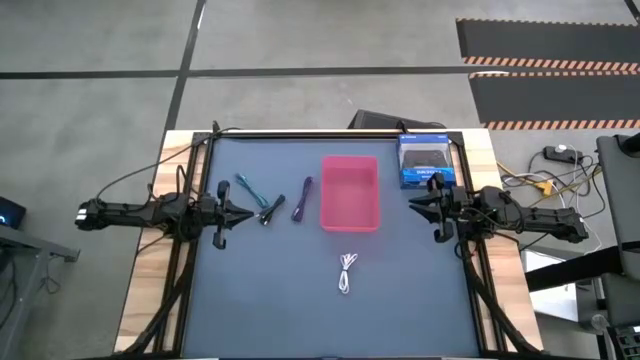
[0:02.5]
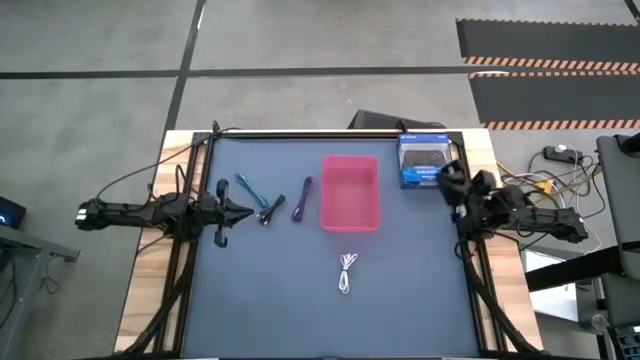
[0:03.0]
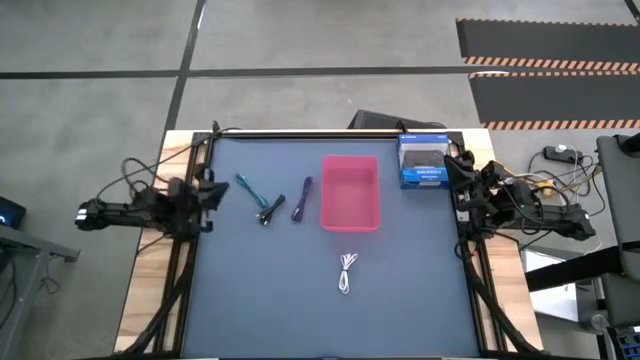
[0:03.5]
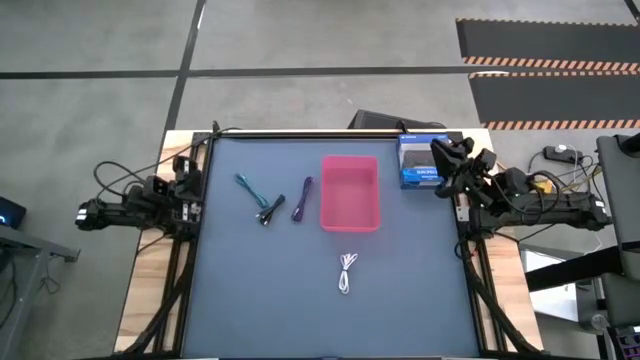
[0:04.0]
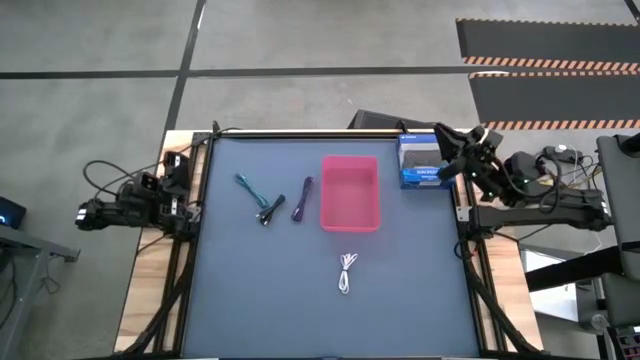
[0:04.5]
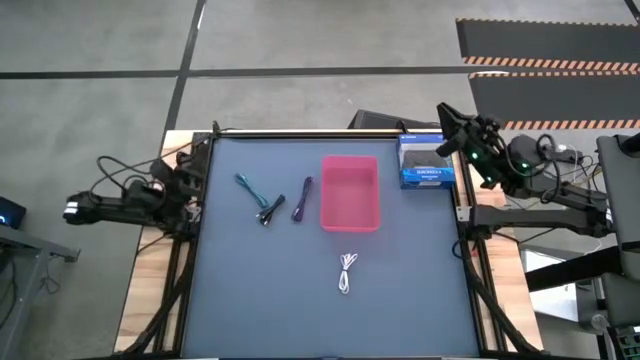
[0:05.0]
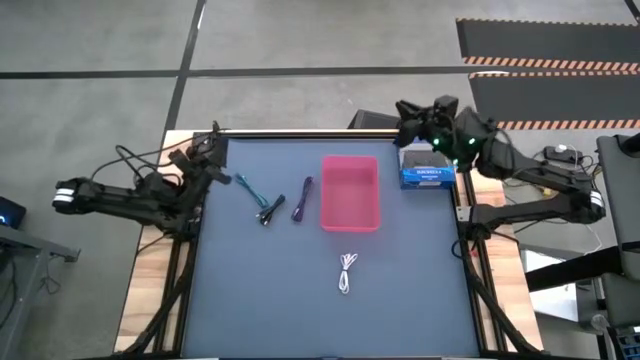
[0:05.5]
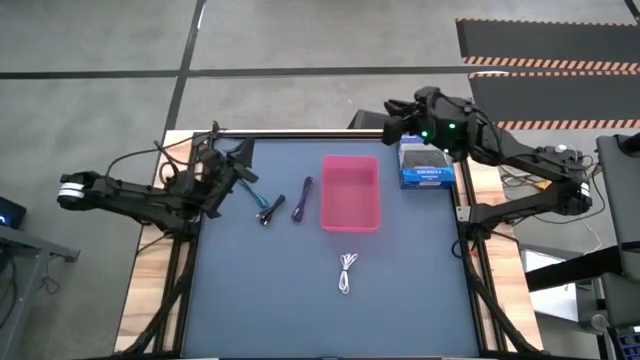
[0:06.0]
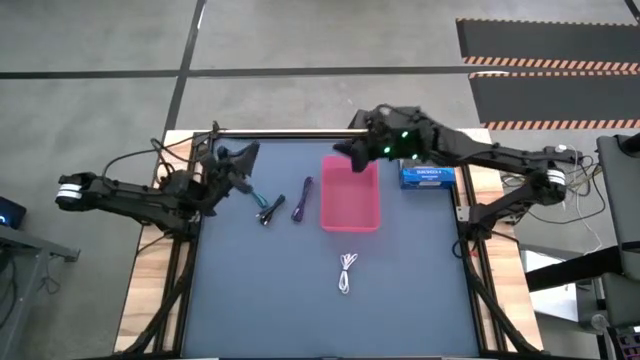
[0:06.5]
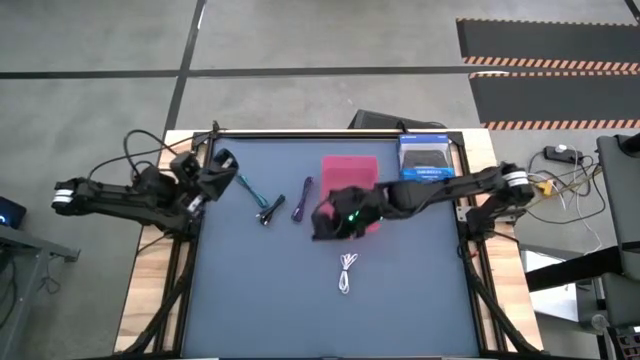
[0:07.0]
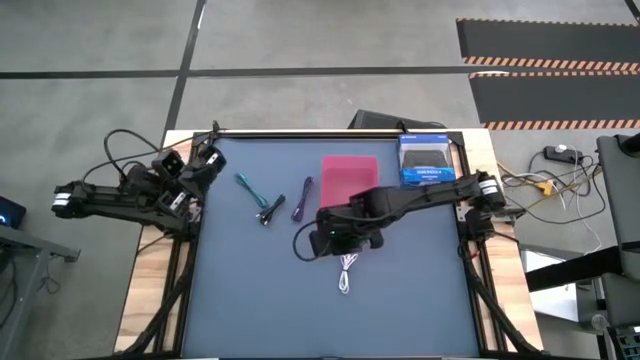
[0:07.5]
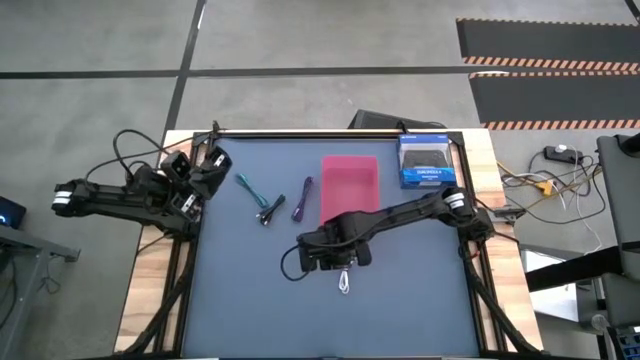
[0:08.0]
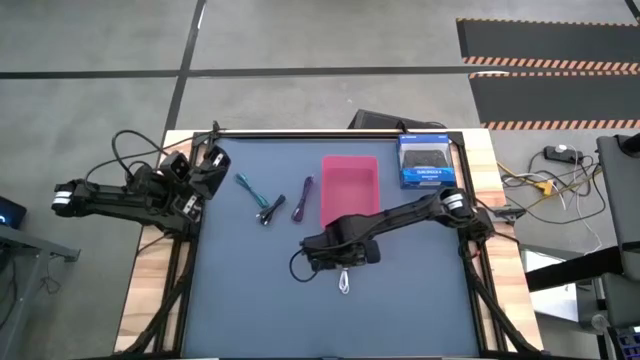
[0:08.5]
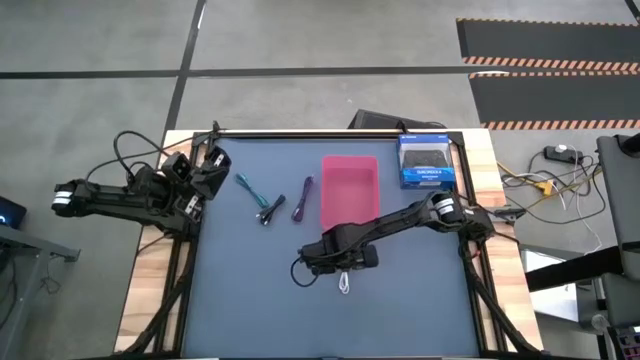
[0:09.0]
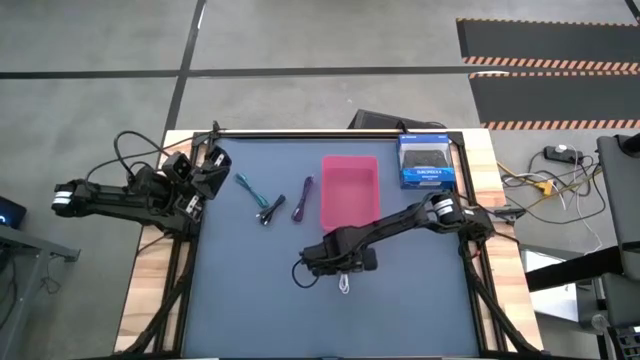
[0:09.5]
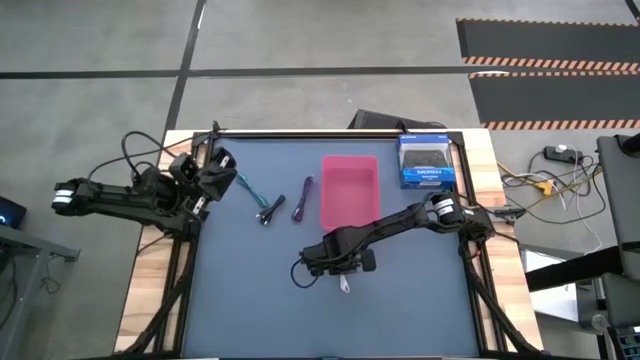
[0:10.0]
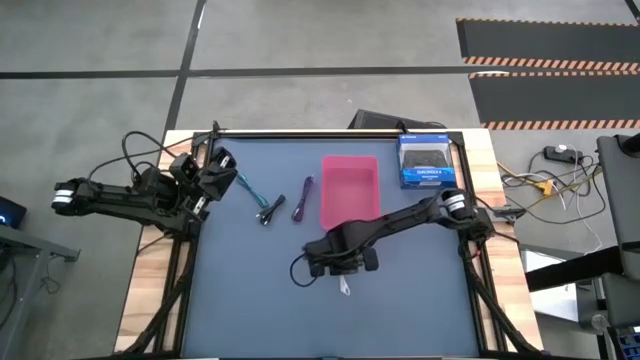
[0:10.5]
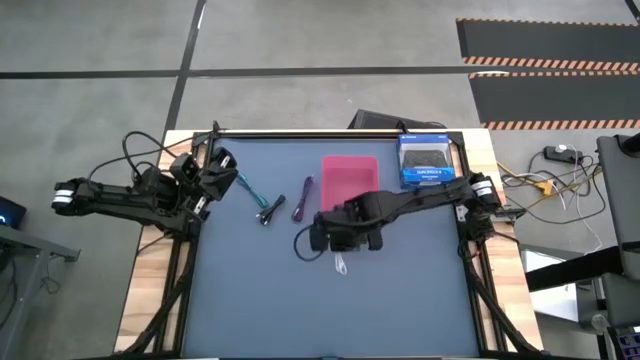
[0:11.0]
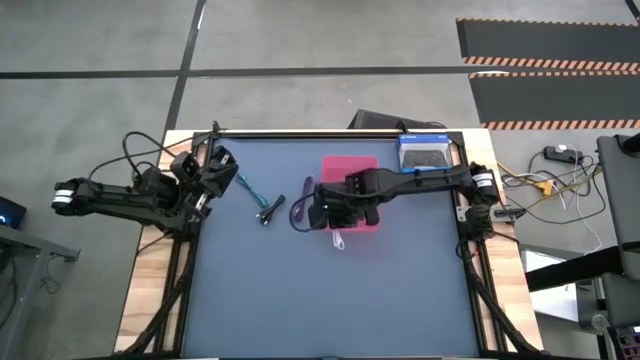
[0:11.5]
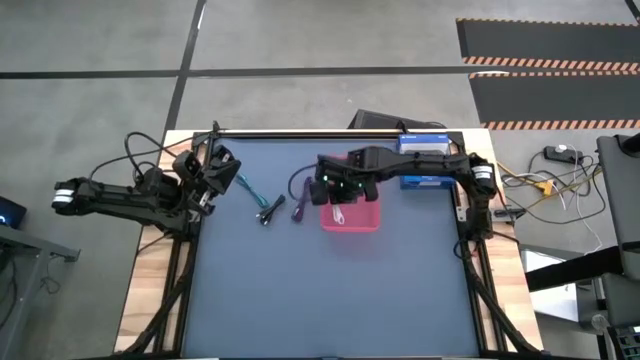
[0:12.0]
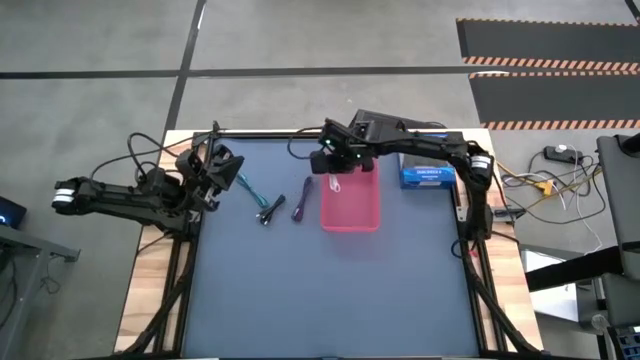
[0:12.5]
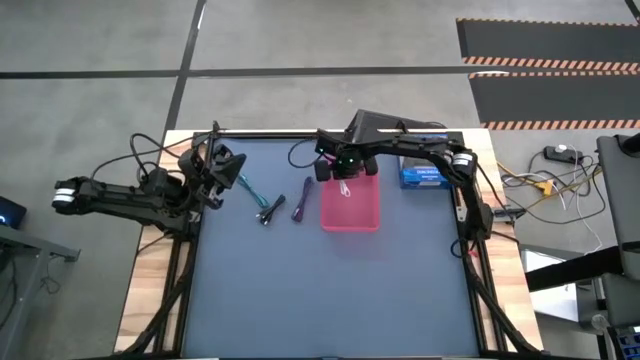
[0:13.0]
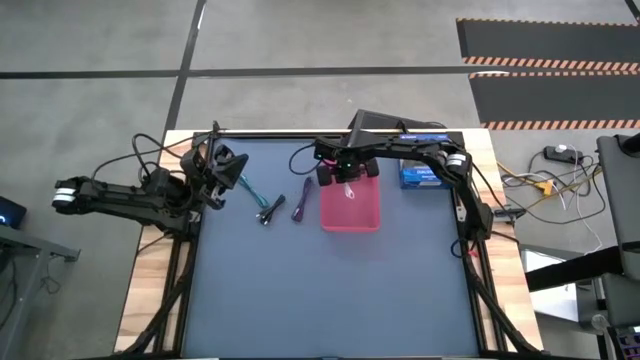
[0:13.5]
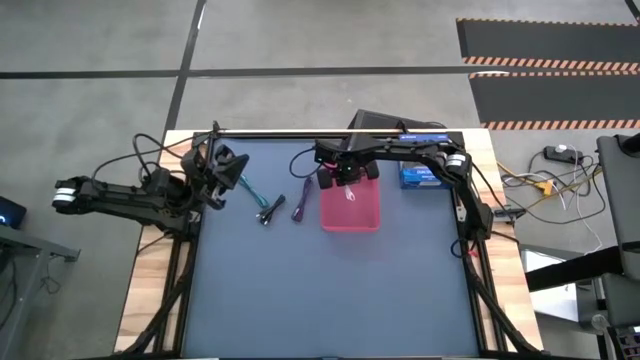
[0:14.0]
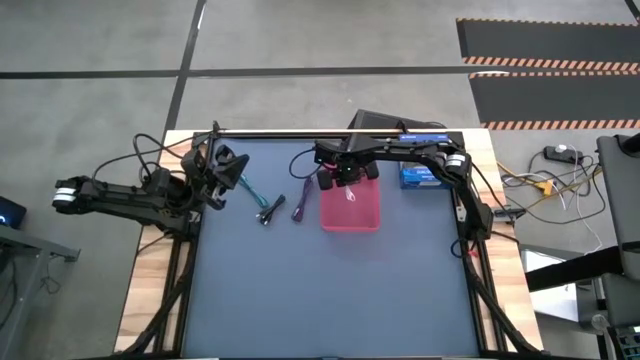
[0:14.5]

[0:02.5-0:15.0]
Task: Pick and place USB-C Cables
Put the white USB cable into the red bin

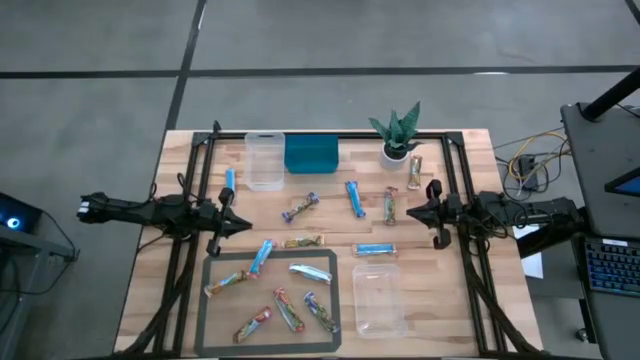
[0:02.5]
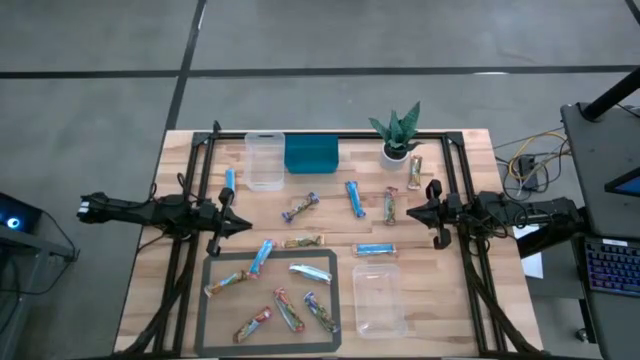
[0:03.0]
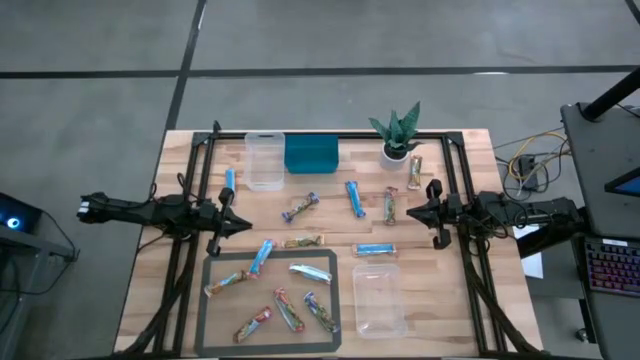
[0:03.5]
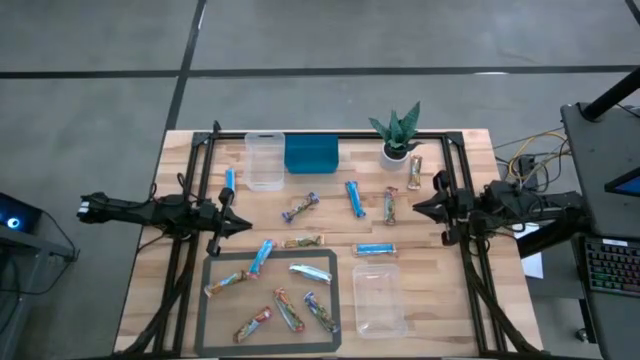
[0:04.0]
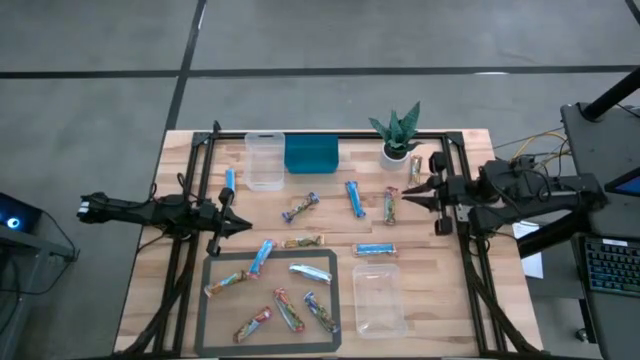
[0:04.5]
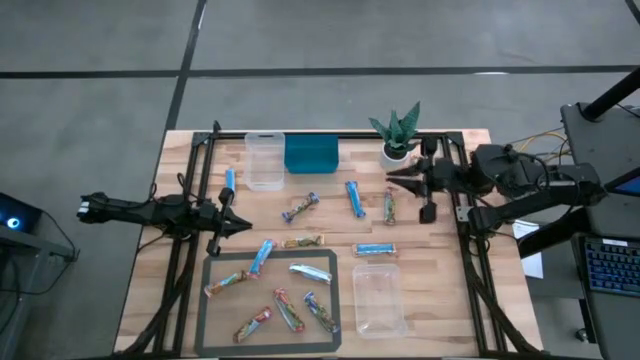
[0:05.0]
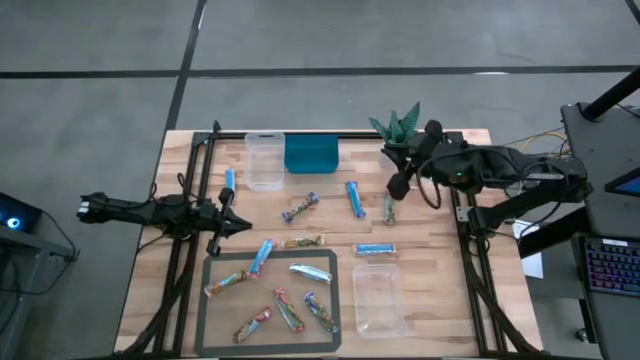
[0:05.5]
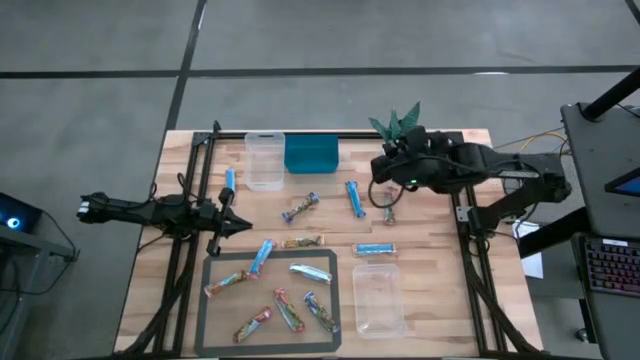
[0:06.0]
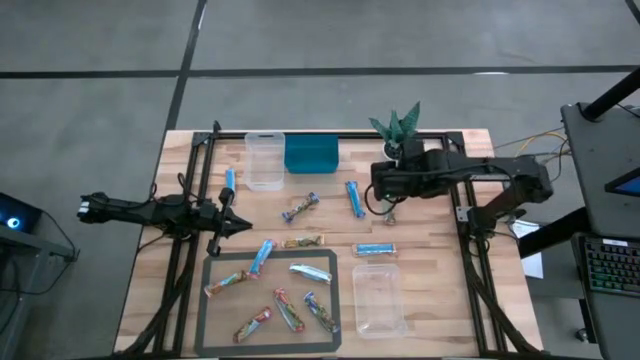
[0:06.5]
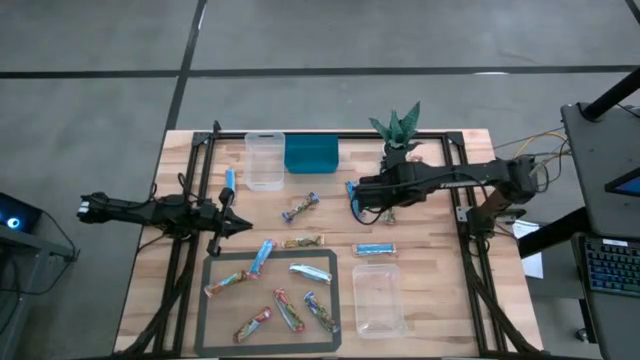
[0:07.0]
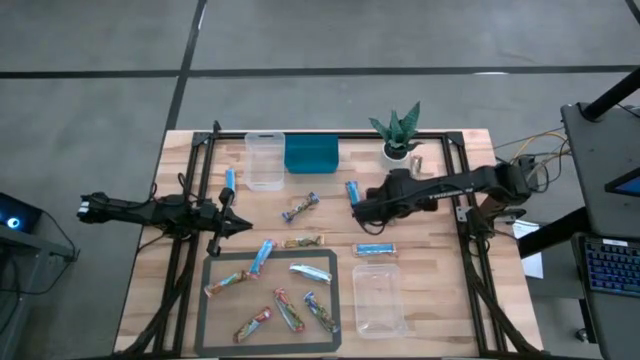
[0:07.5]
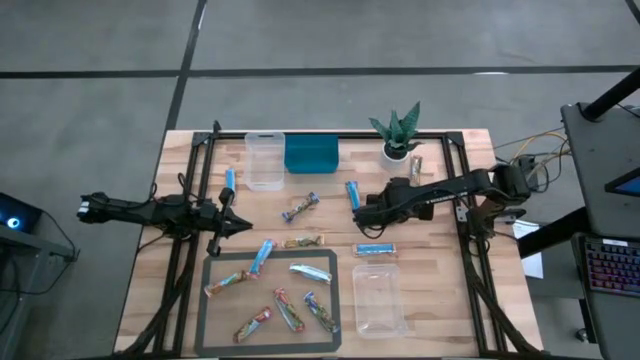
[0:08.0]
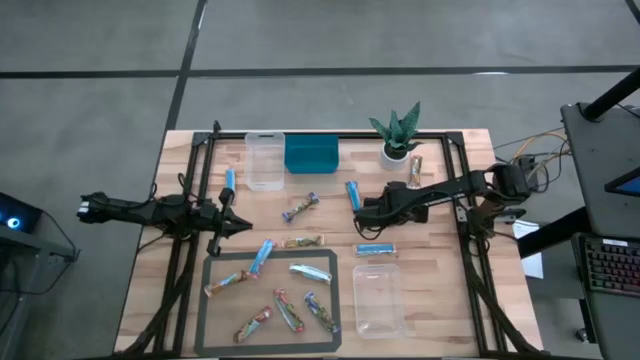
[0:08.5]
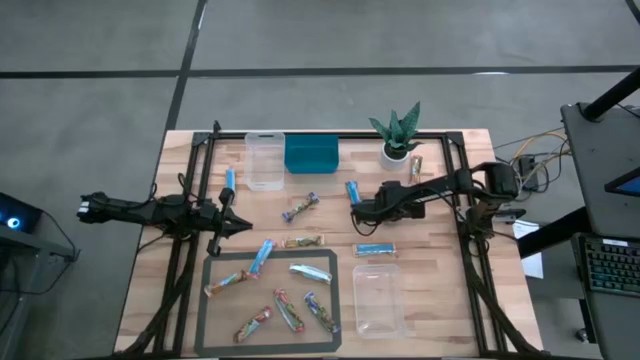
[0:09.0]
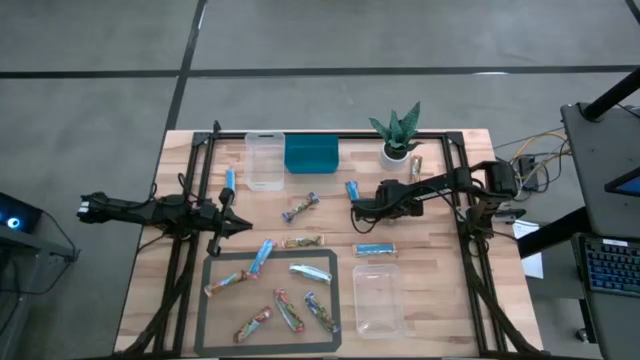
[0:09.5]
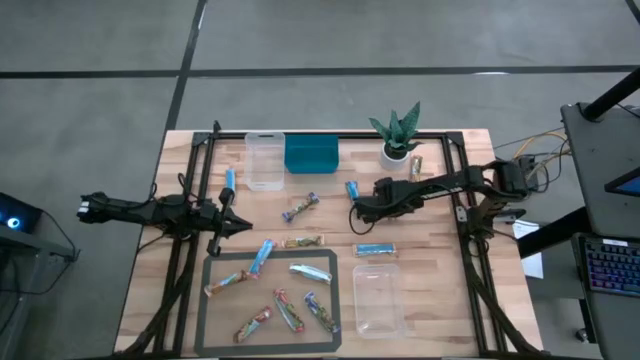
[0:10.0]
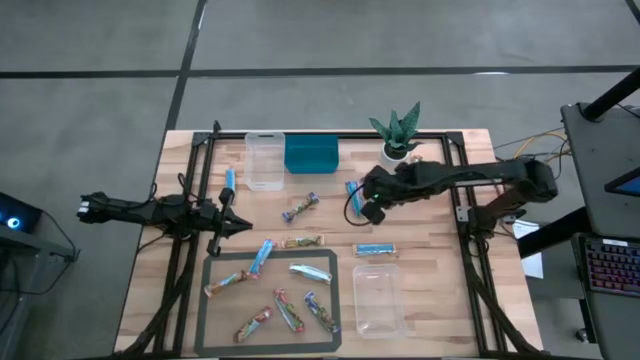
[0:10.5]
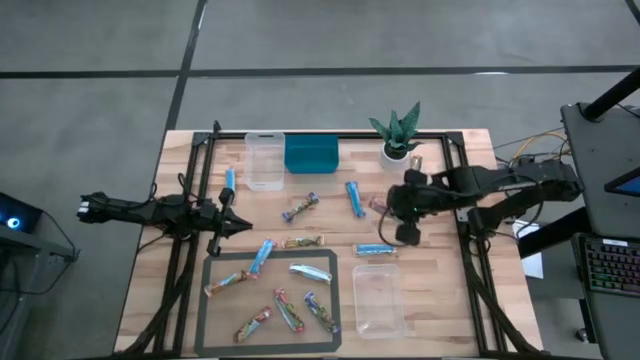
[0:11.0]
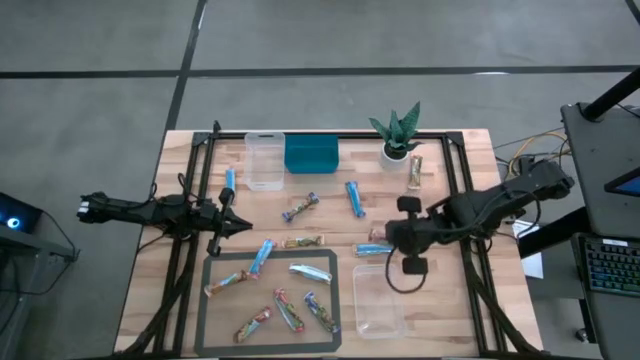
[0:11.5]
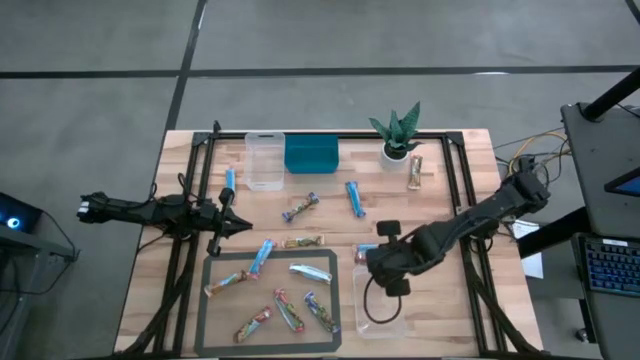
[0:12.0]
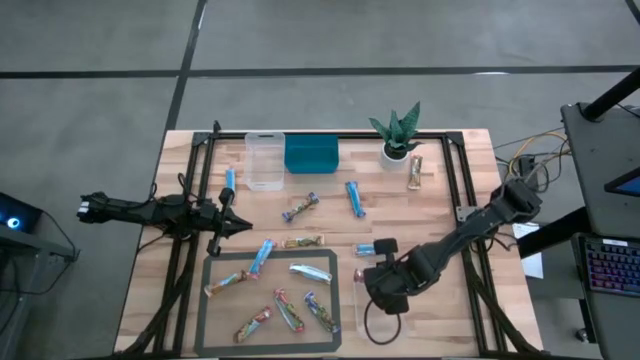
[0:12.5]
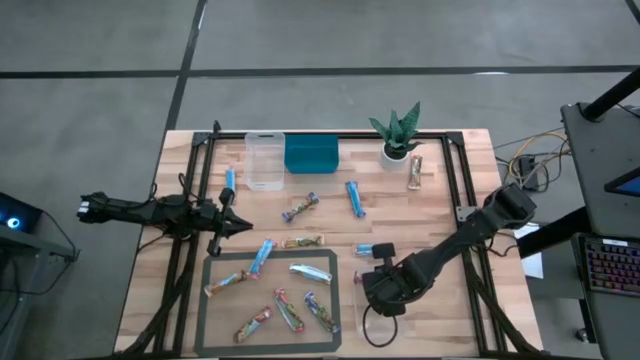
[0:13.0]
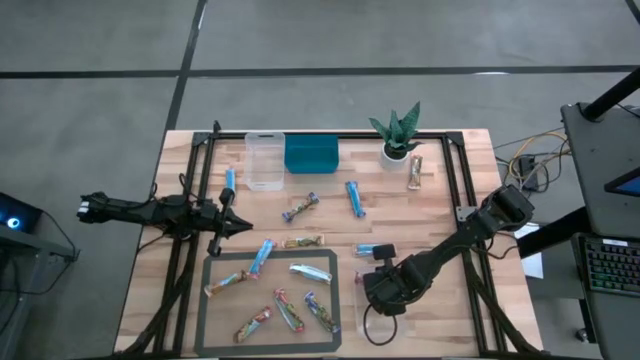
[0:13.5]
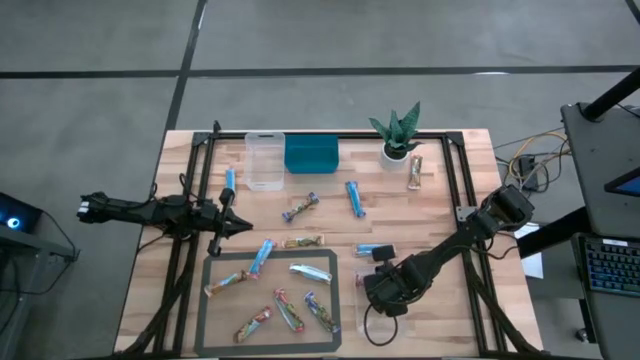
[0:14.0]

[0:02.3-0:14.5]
Task: Pick and place Granola Bars by type
Put the red granola bar into the bottom transparent bin
